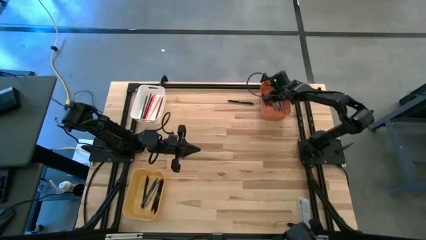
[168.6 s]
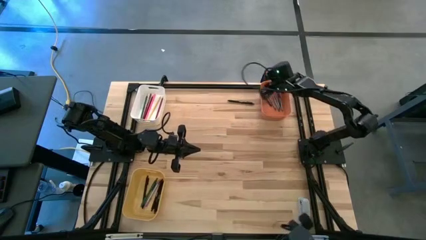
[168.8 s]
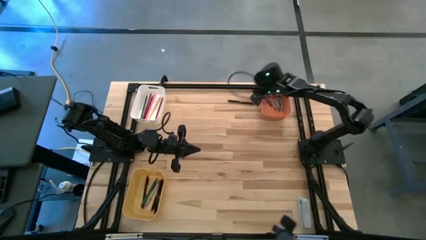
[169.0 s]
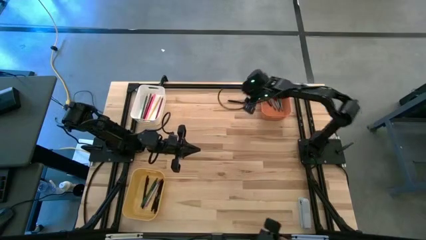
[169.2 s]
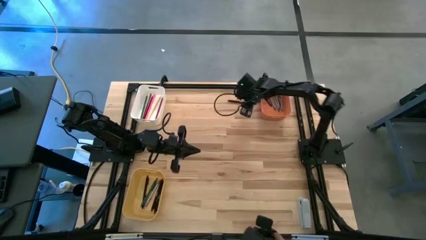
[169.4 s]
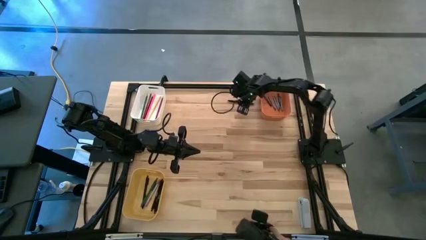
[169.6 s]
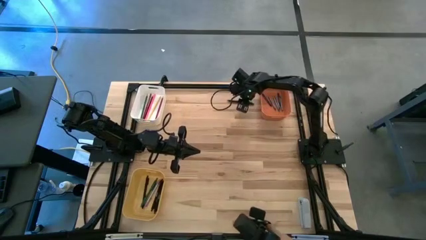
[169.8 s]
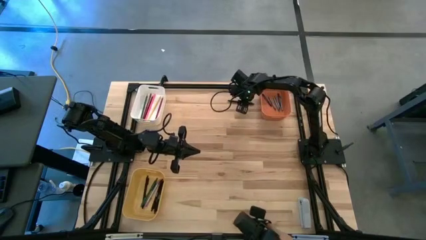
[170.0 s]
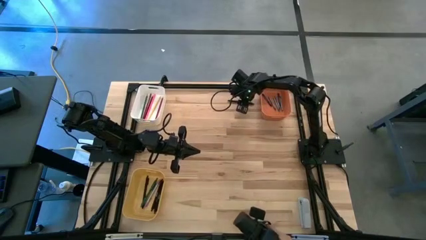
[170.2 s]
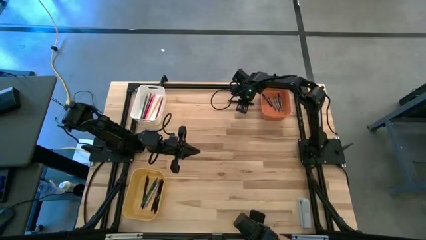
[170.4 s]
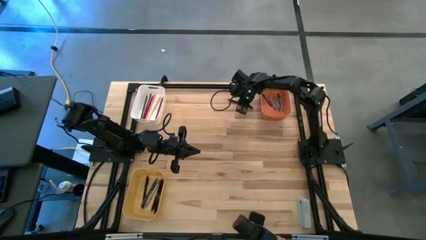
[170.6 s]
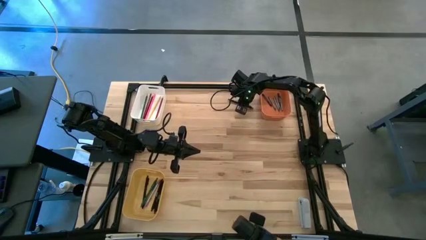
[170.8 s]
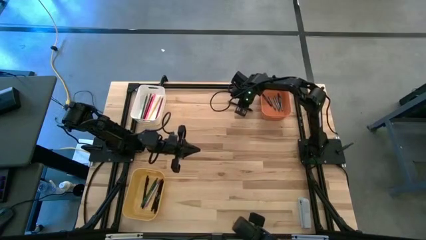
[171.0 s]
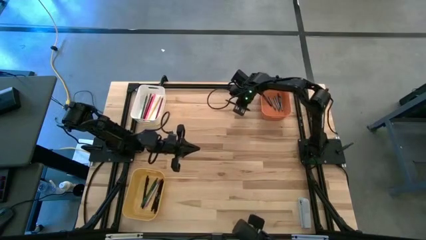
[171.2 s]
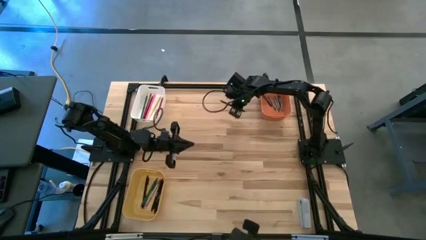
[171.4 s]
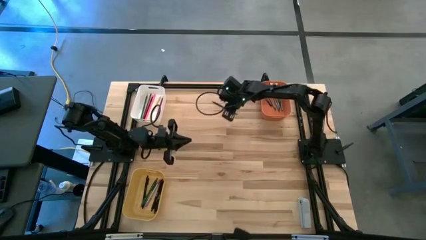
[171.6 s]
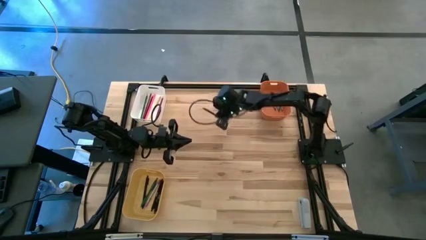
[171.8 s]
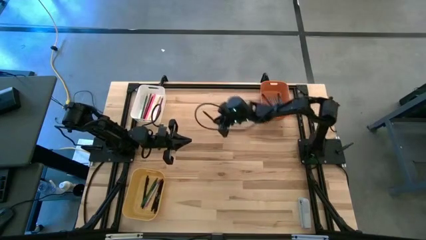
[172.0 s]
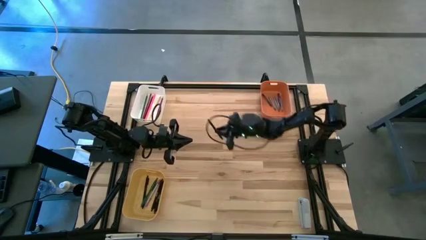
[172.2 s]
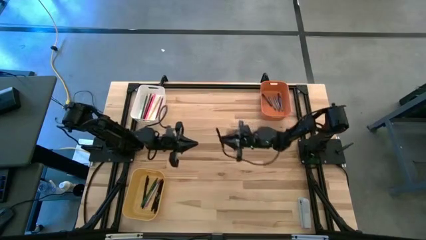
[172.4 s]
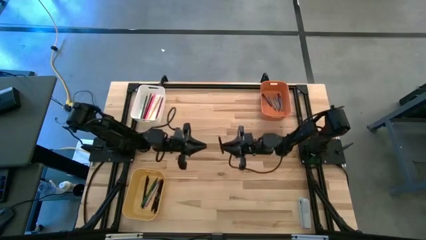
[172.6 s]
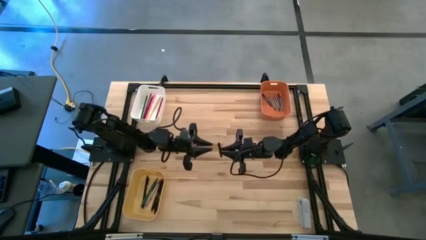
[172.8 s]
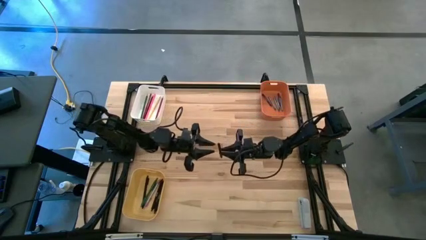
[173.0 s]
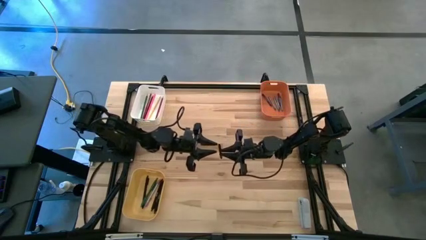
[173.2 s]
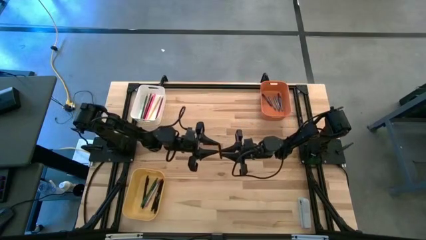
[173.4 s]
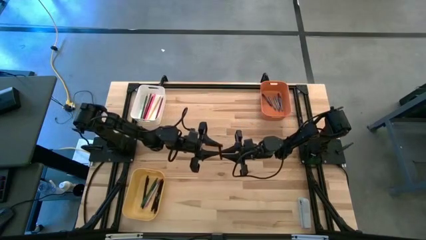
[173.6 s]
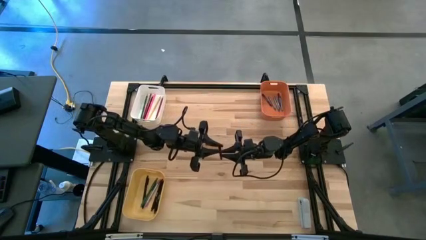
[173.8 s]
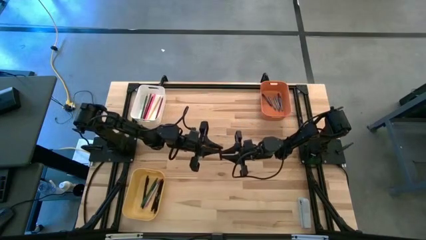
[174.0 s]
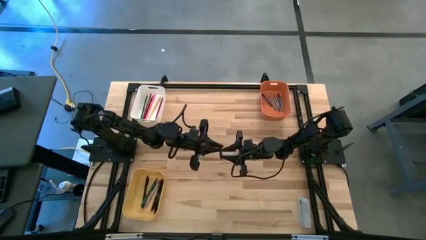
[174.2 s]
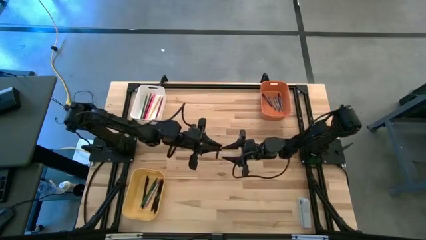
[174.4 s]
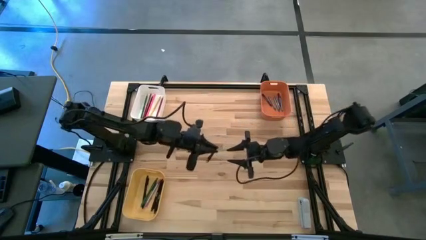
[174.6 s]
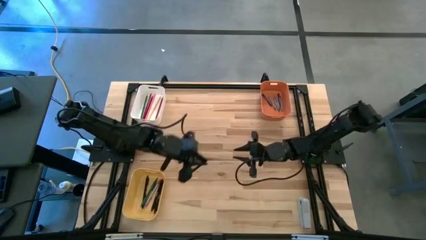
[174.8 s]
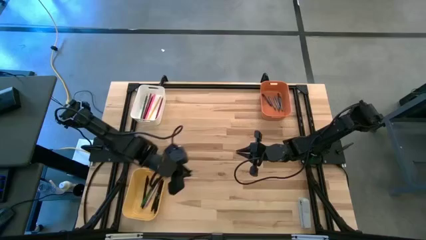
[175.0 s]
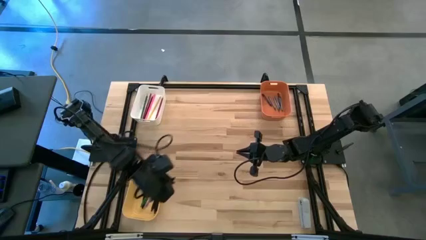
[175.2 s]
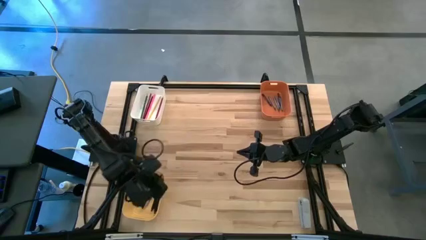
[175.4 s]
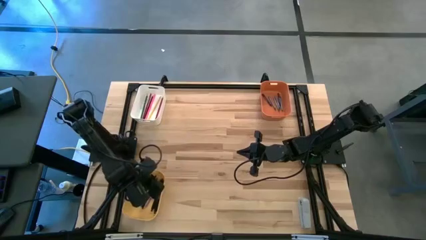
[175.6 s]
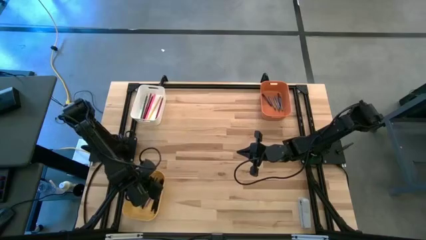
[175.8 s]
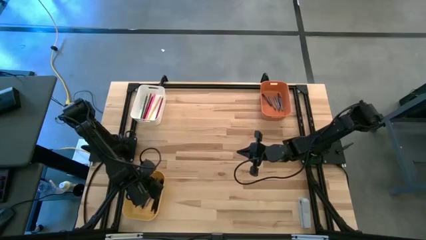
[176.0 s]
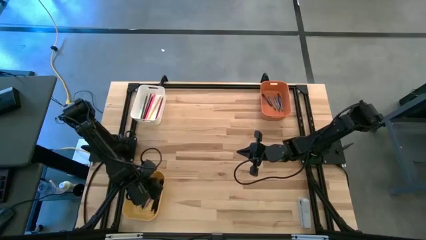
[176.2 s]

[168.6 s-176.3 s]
Task: Sort crayons/erasers/pens/pencils in bins
Put the black pen into the yellow bin

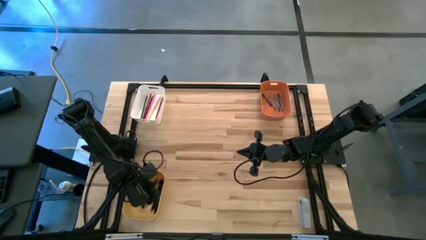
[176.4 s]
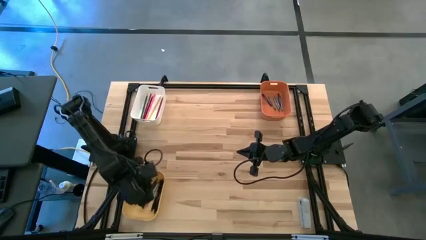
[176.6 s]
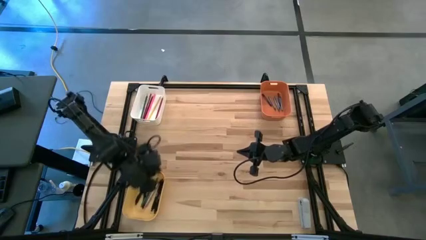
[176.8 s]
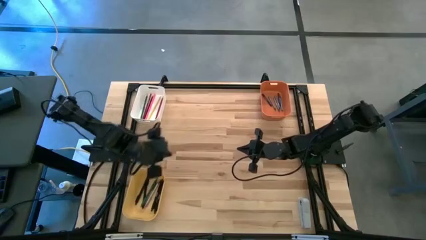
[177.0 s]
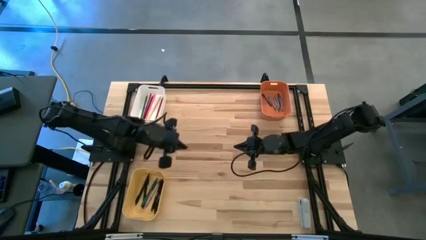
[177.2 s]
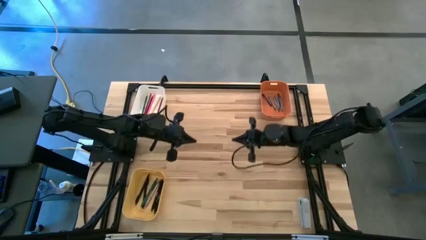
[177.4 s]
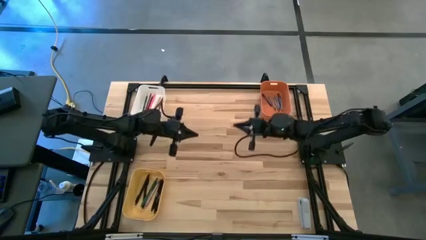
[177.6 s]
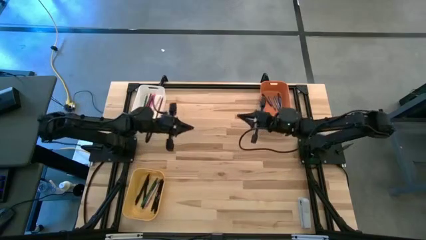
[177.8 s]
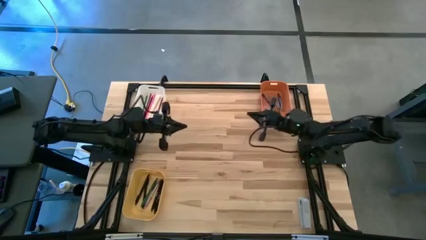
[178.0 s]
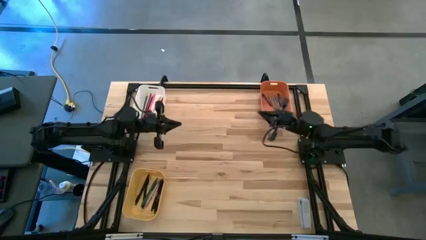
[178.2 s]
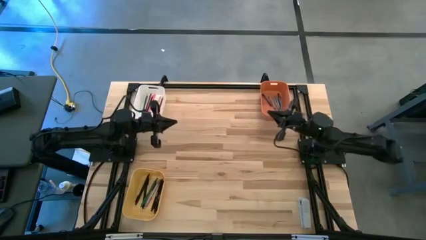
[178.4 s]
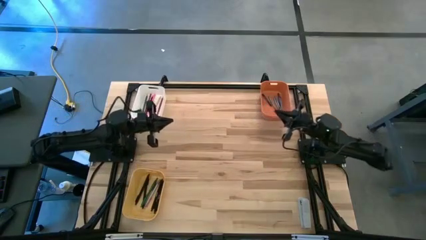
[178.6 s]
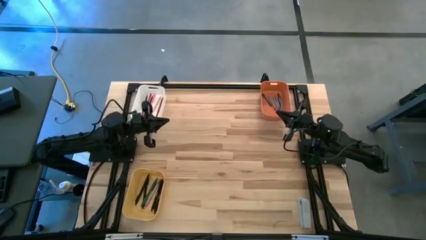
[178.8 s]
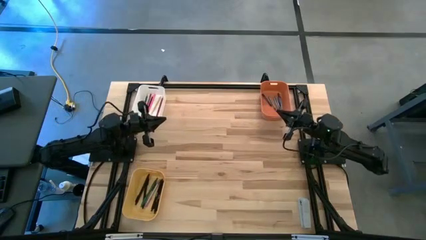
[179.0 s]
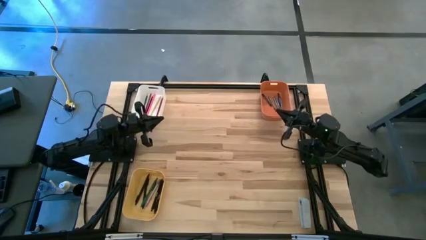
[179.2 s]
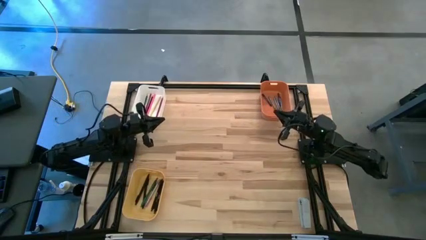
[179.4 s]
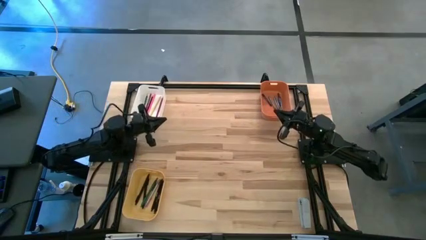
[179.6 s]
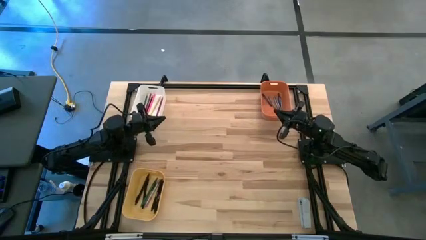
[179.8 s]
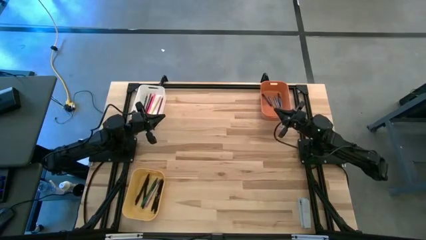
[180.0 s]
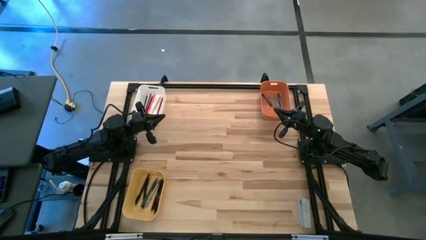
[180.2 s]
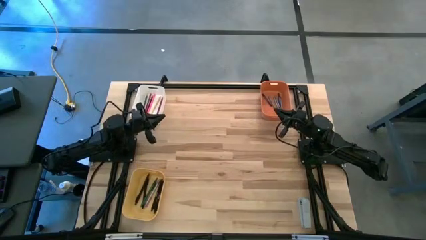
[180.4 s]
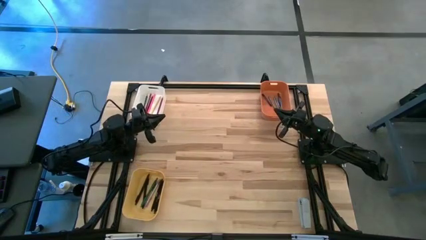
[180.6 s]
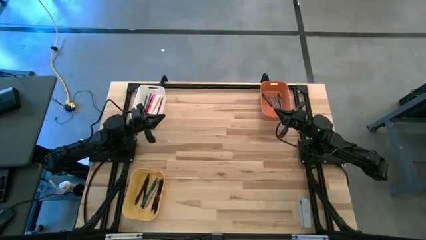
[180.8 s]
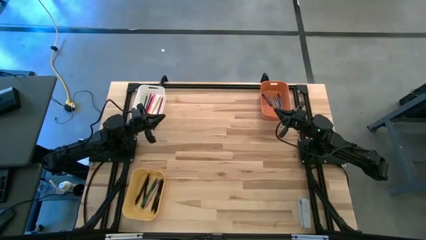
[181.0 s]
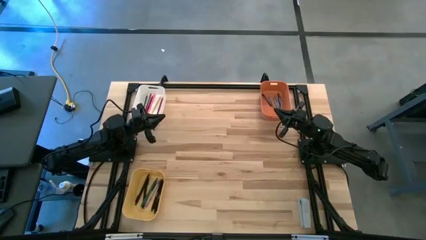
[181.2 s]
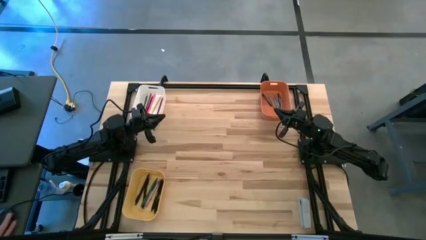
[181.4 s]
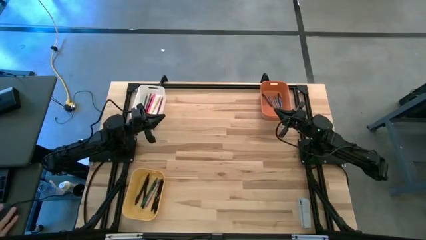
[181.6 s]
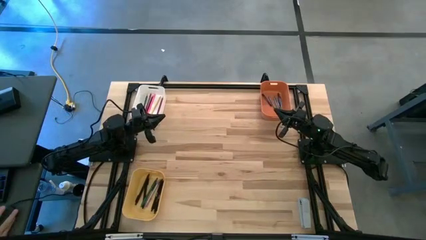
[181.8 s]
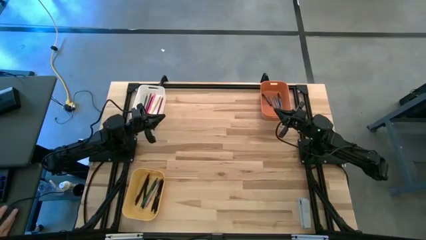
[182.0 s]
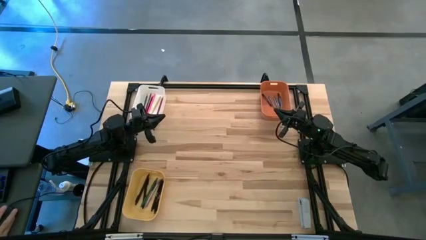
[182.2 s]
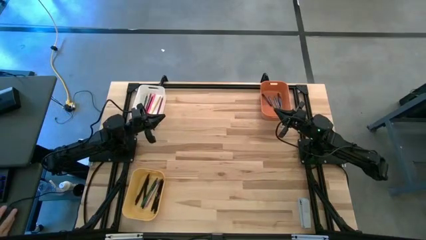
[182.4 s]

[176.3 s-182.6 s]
Return to Home Position

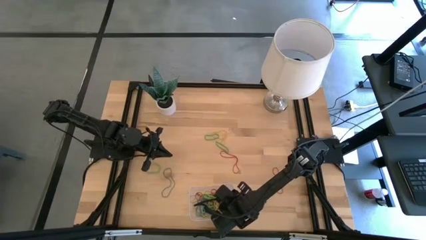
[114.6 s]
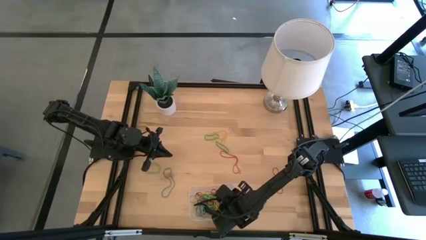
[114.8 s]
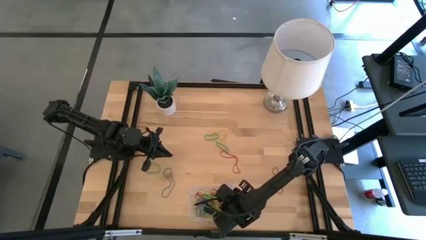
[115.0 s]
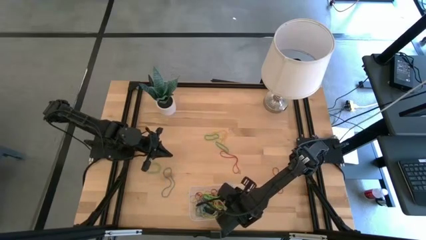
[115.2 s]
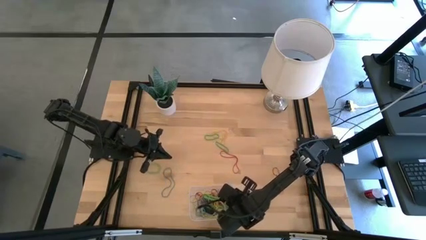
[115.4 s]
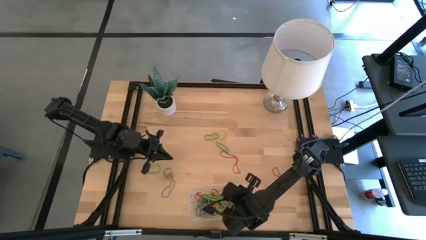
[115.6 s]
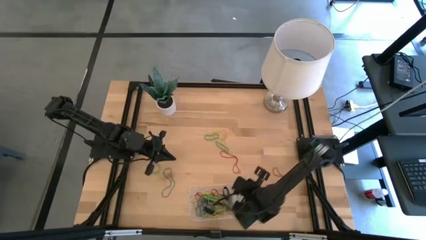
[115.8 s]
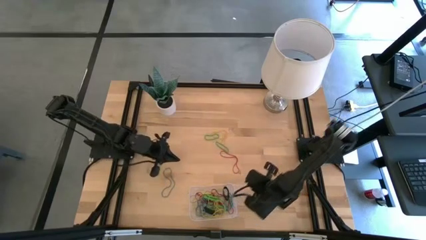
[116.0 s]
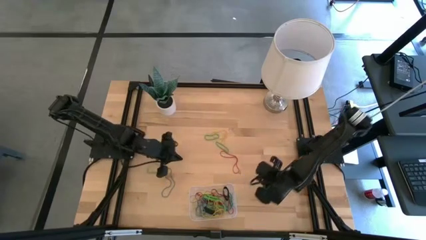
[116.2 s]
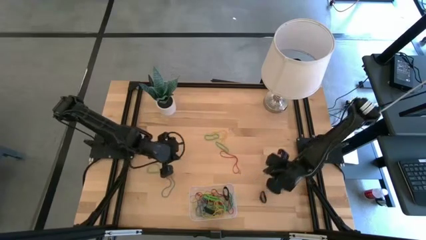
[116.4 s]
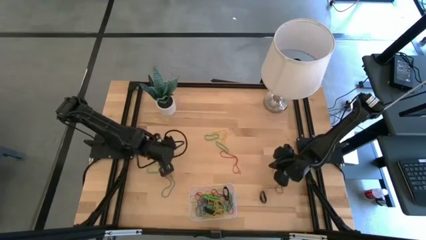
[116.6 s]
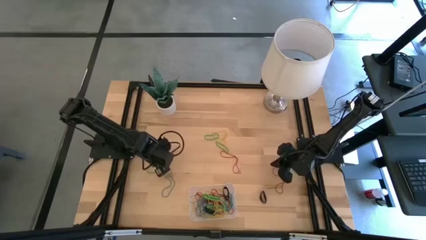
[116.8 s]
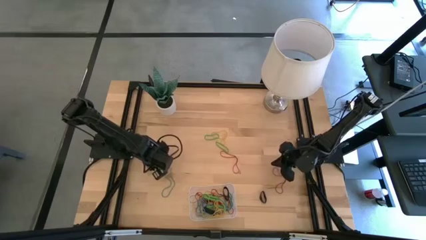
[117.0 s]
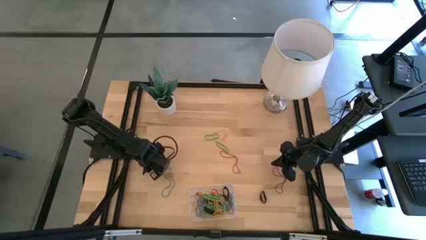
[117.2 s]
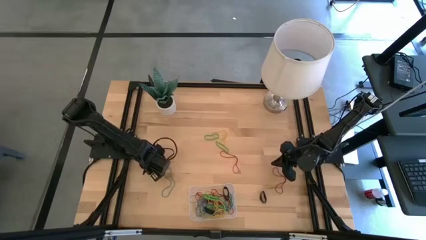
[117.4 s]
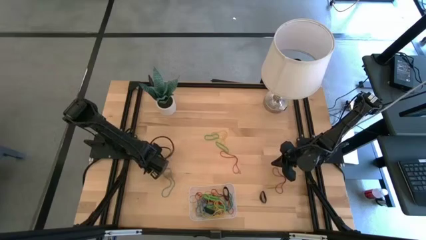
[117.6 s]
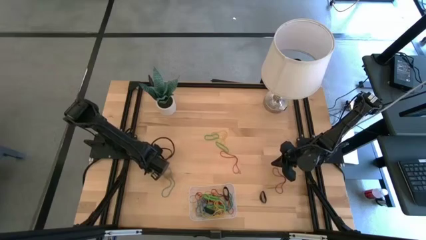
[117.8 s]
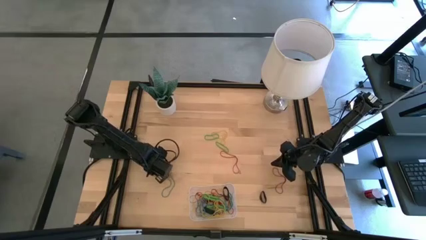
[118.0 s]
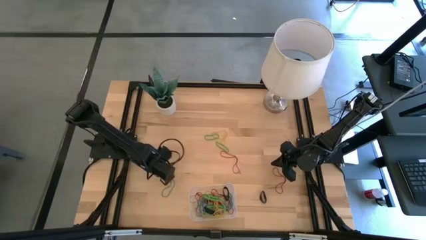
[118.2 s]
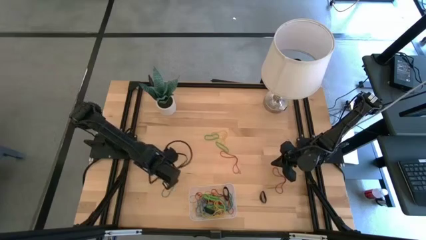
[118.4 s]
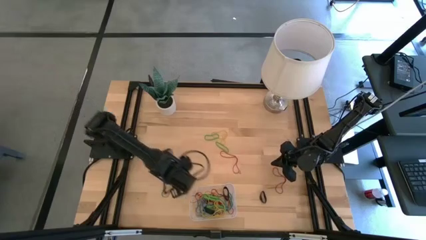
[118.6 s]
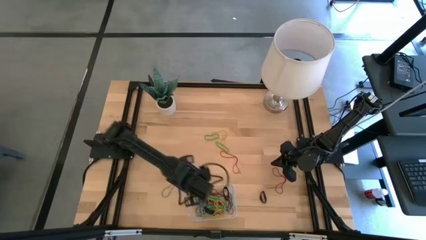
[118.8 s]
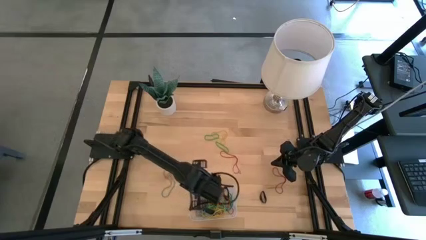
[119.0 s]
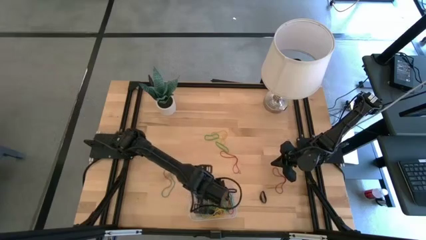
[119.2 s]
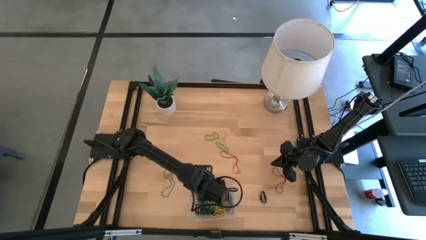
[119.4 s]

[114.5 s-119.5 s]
Task: Pick and place rubber bands into bin
Put the green rubber band into the transparent bin
